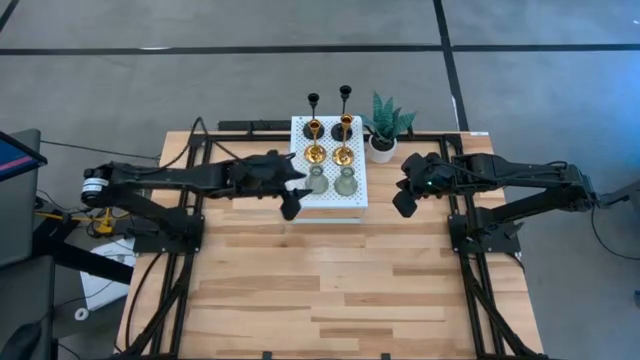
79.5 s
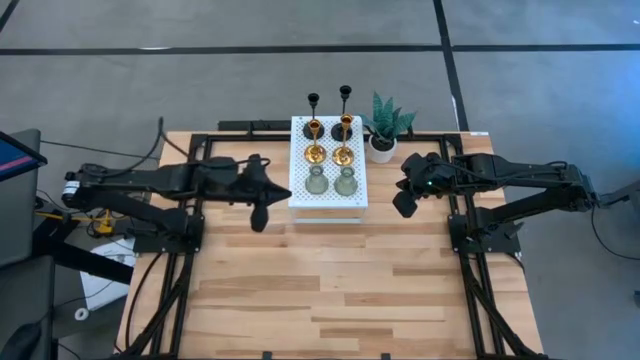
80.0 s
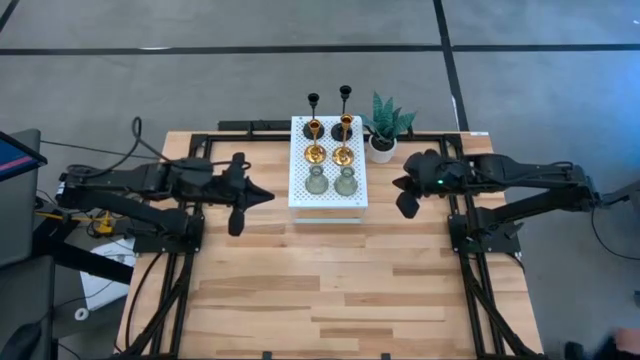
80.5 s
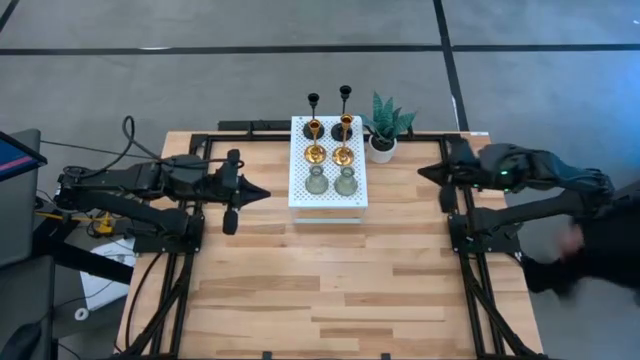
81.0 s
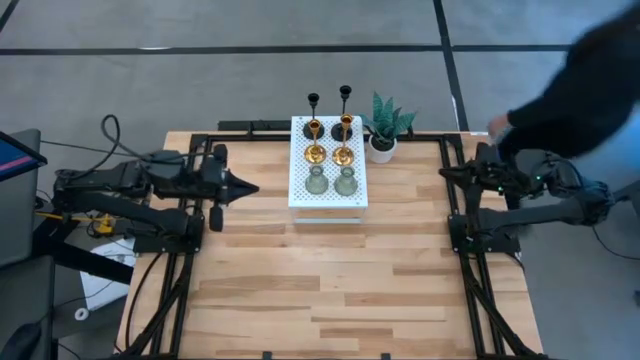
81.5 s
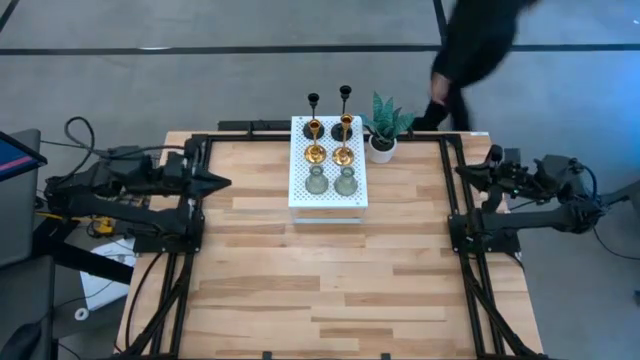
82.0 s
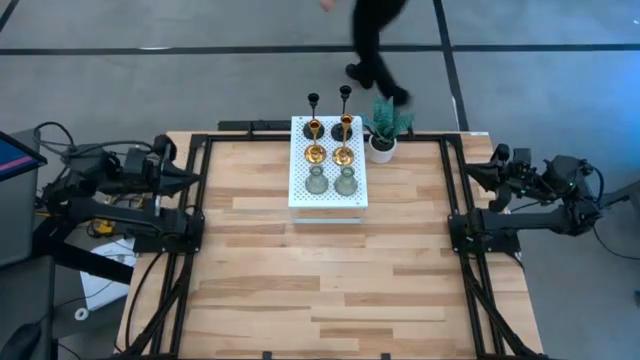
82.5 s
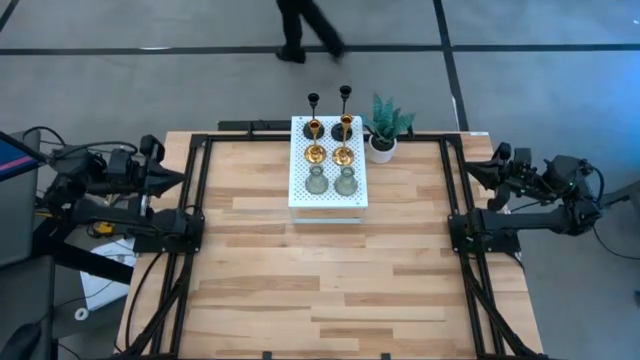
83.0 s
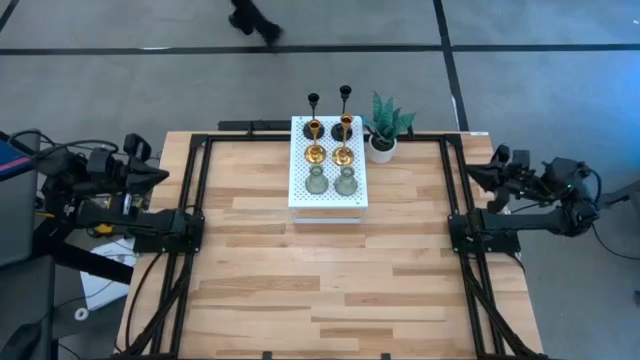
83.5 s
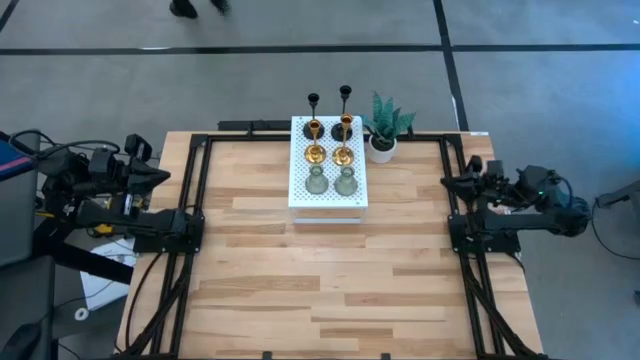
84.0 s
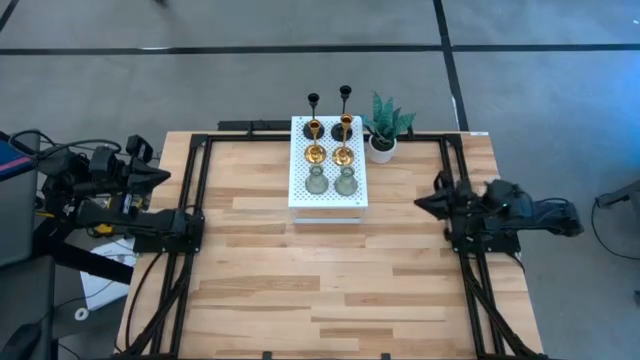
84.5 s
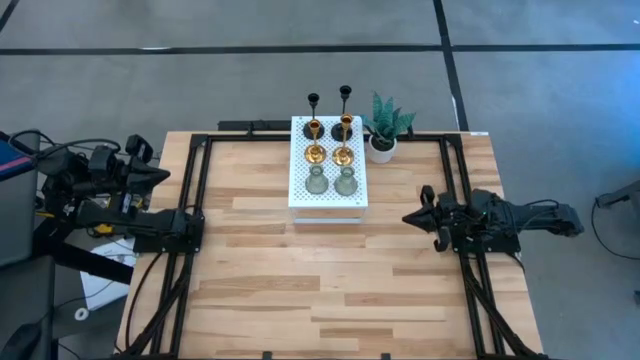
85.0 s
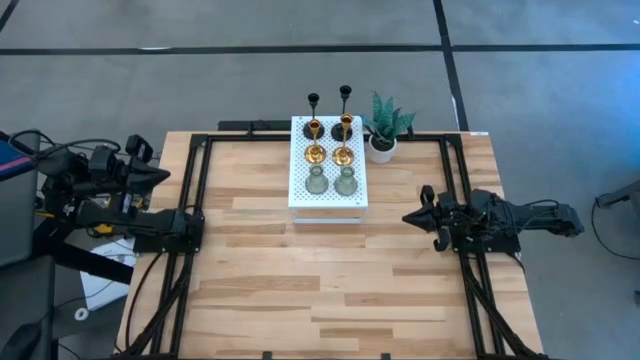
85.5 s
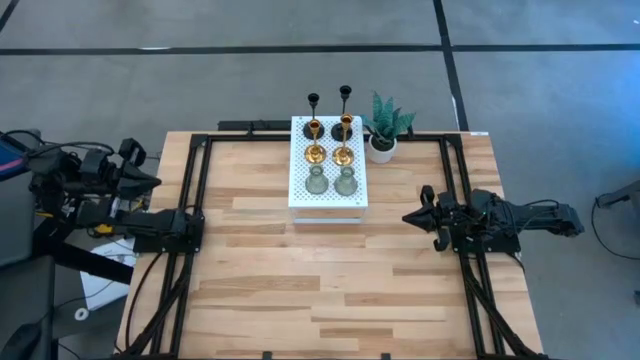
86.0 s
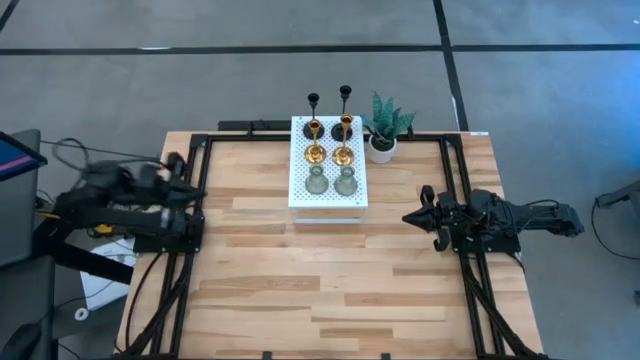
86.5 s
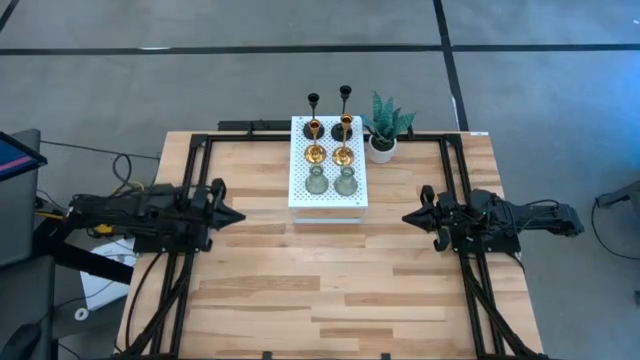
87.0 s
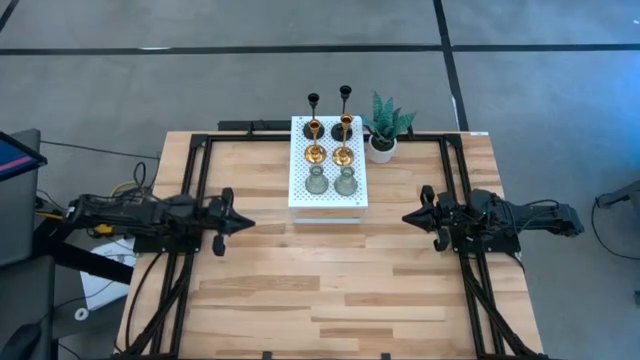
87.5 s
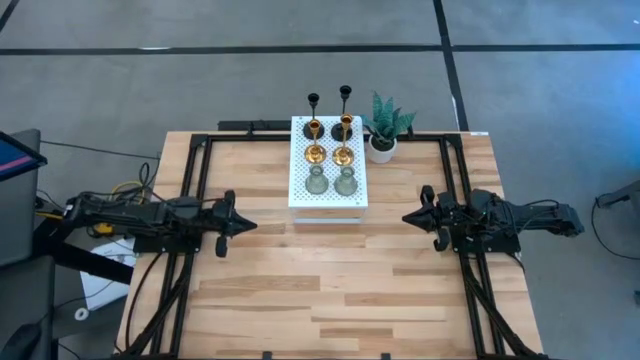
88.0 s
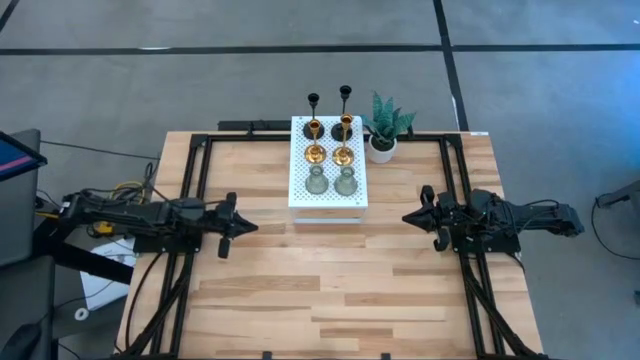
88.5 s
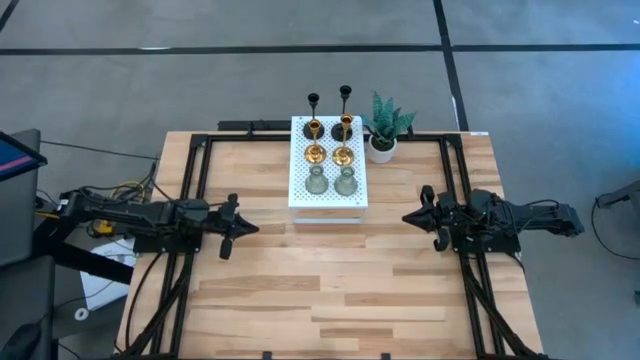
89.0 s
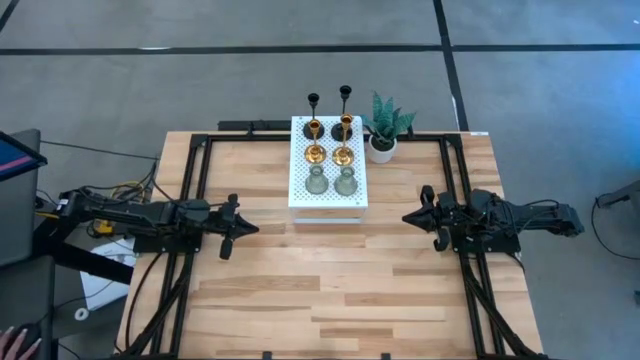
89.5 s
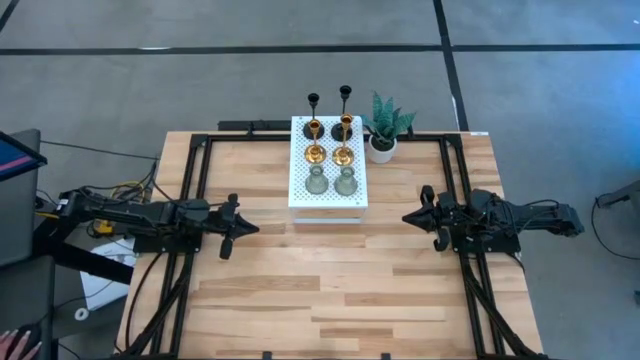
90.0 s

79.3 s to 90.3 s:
Task: Pick & Place candle stick holders
Return to Home Position

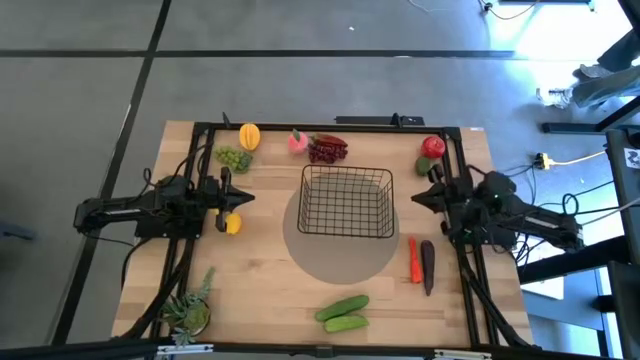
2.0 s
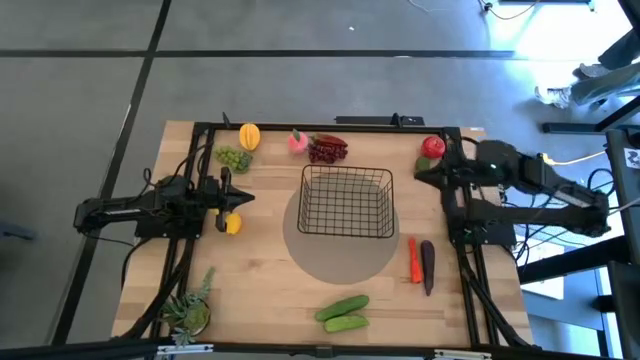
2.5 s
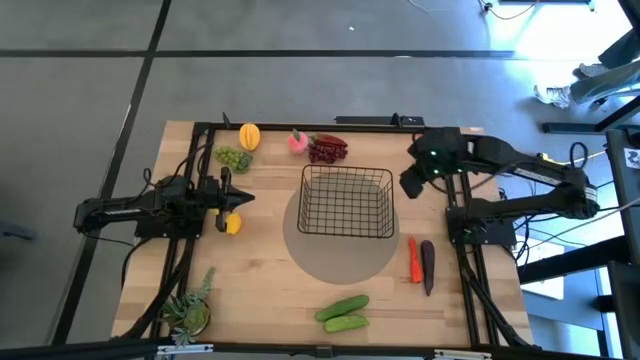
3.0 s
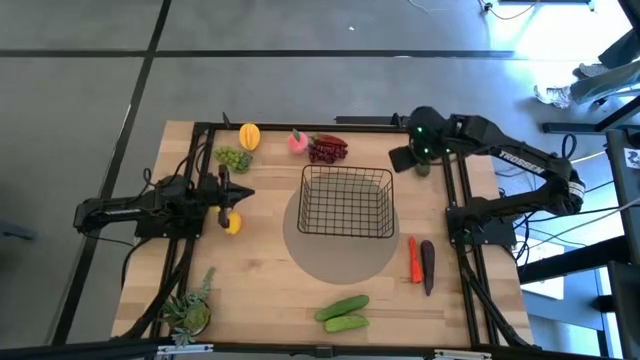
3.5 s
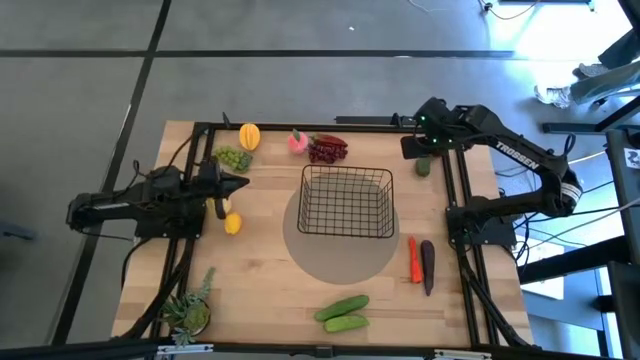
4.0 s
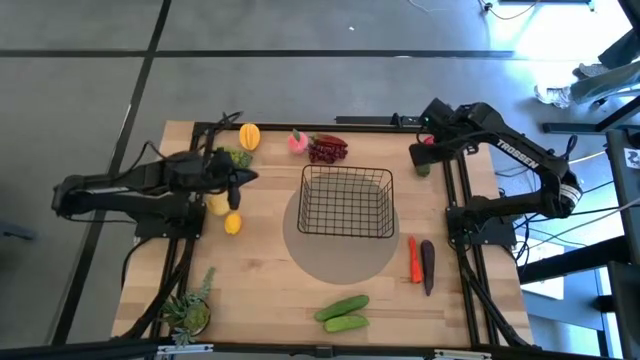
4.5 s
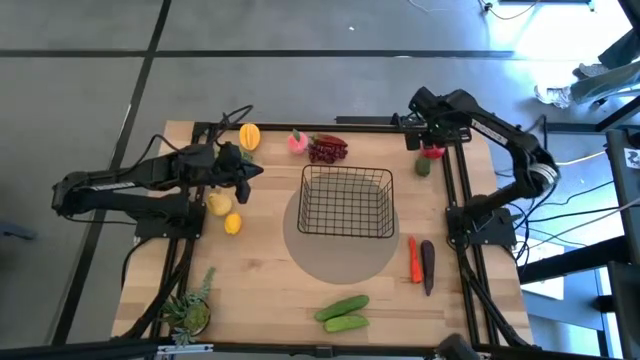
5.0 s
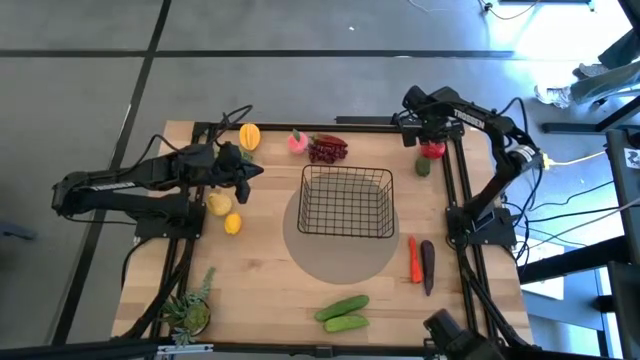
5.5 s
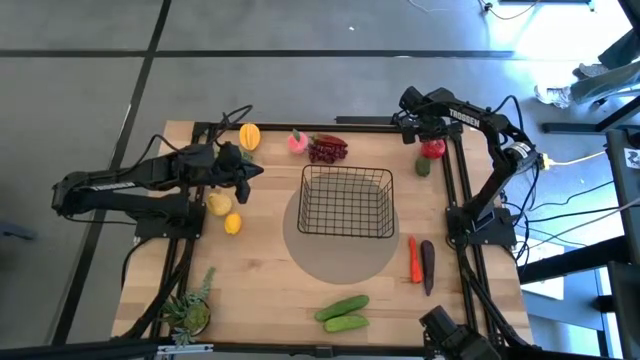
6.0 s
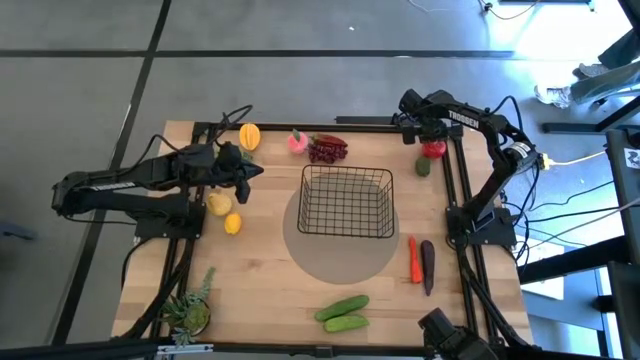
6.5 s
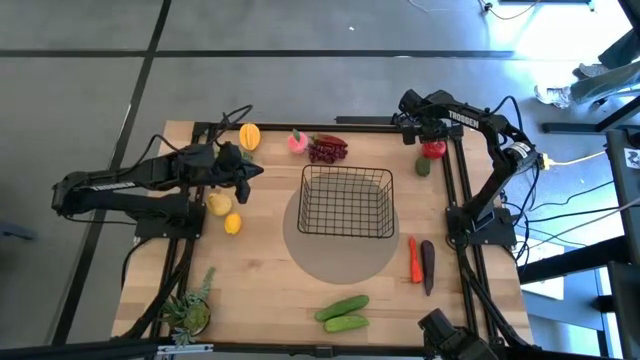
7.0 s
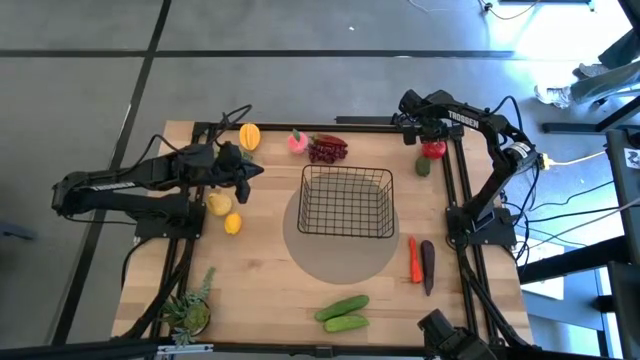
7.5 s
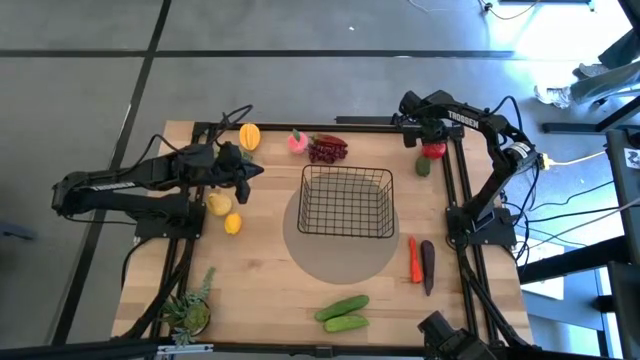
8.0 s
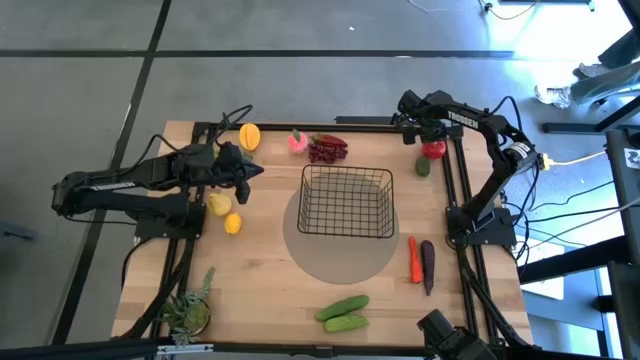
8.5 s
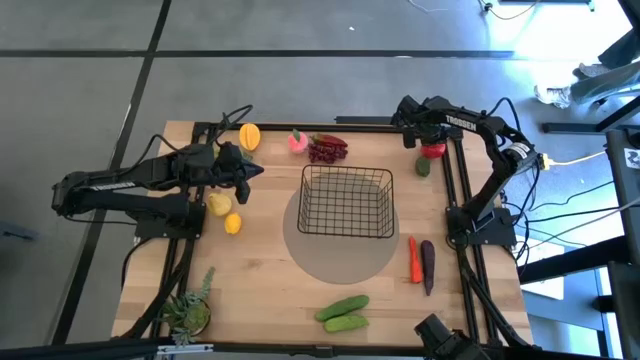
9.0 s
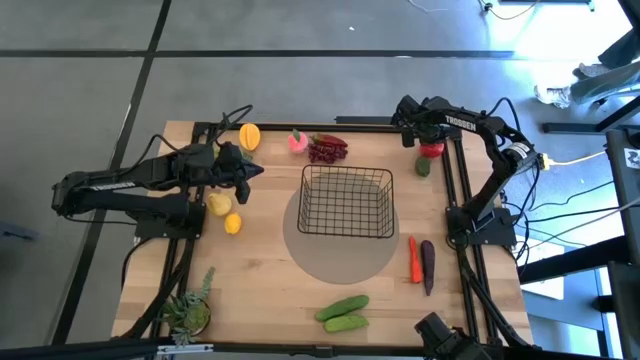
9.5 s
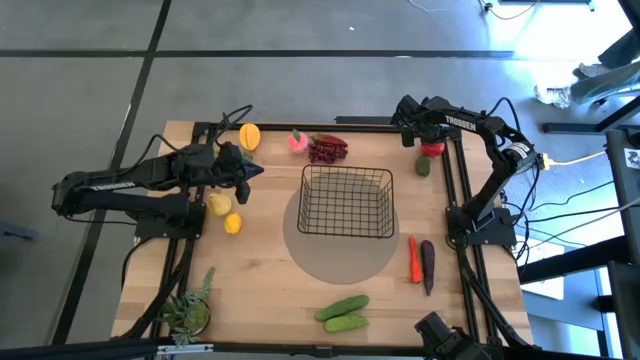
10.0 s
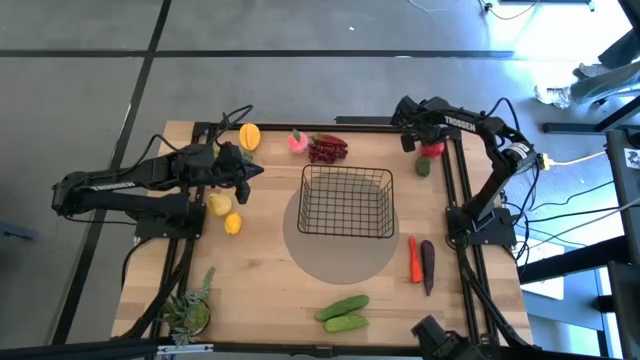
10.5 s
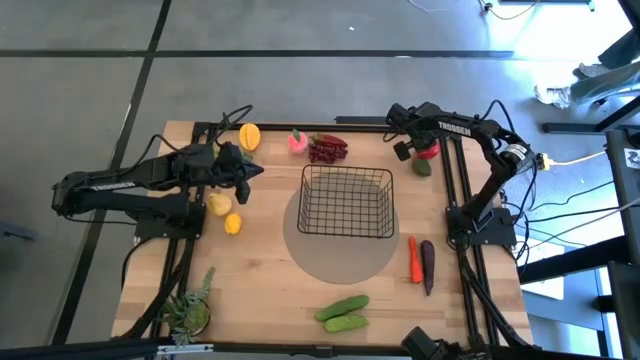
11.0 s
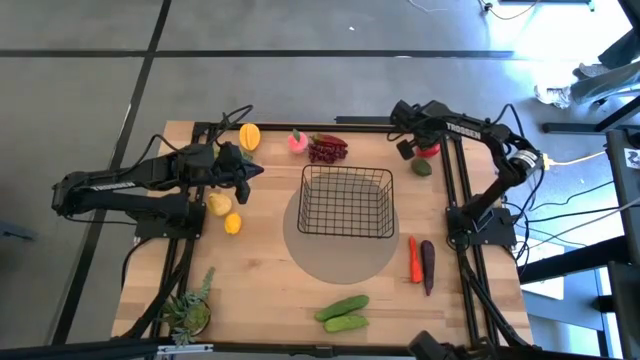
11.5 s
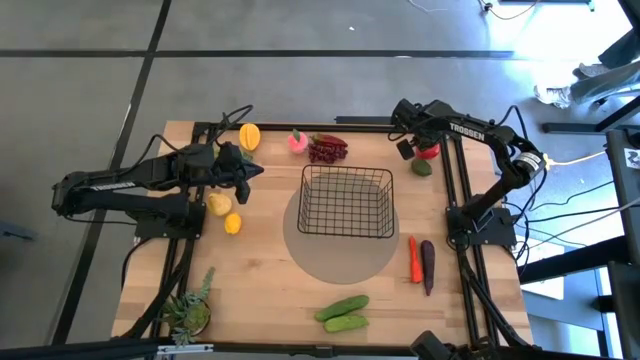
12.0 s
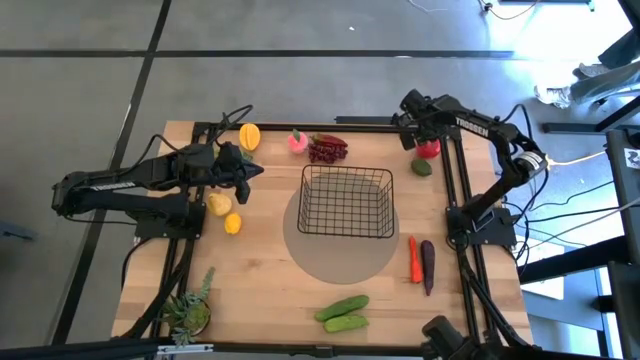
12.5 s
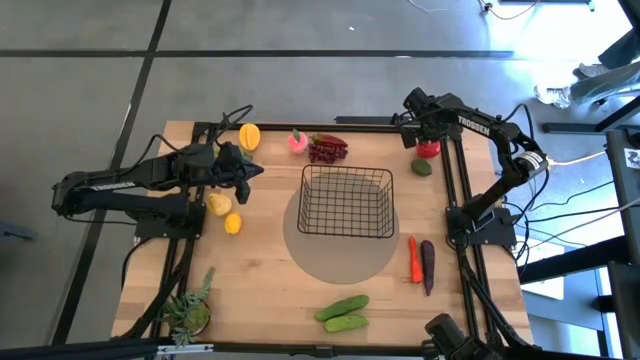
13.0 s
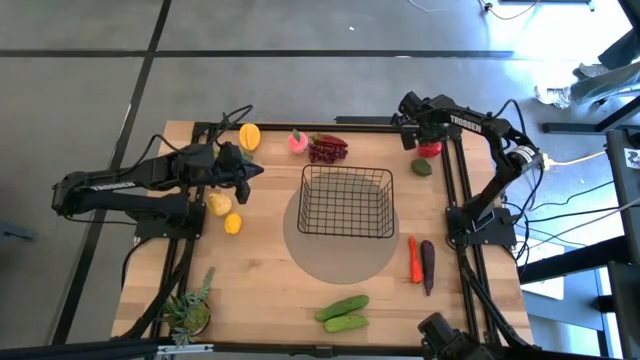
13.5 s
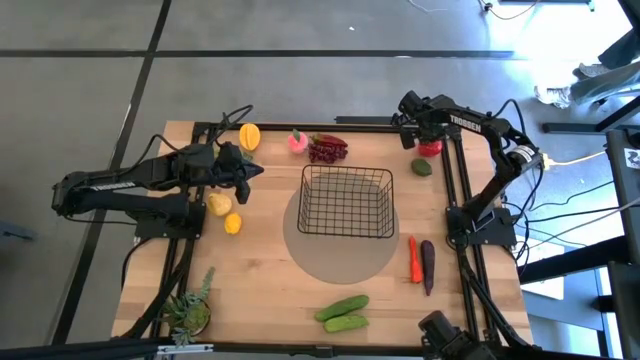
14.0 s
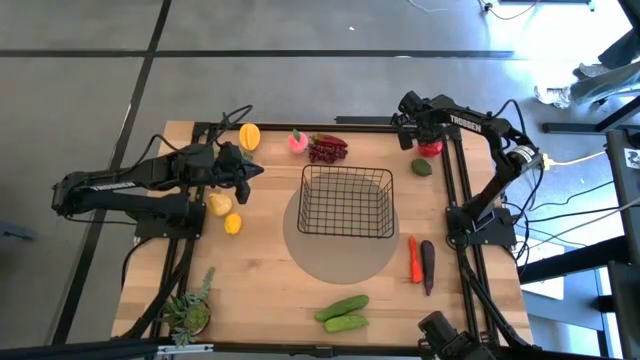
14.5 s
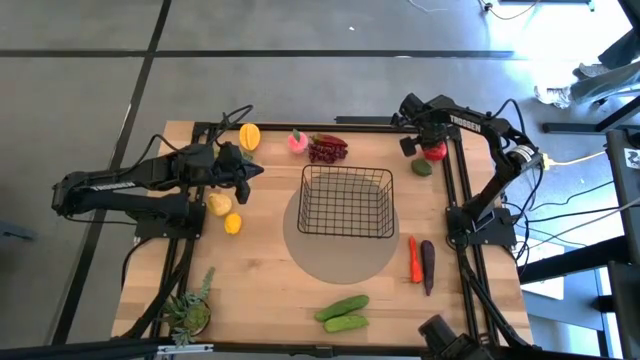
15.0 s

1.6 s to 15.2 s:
Task: Build produce basket
Put the red apple into the black wire basket
